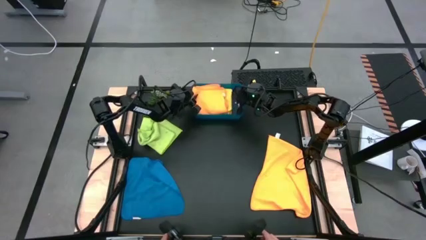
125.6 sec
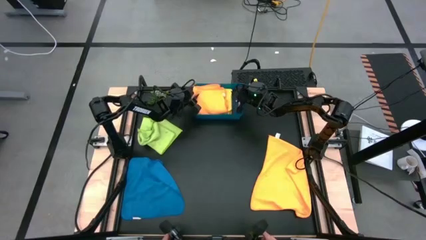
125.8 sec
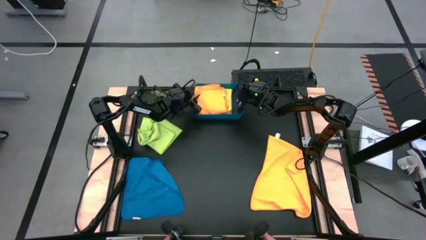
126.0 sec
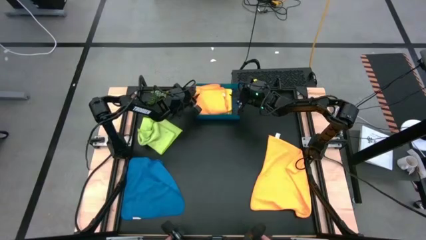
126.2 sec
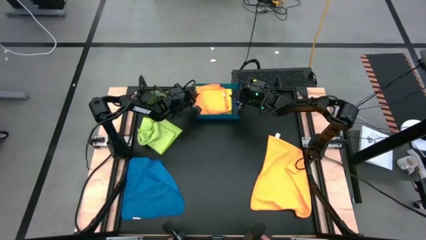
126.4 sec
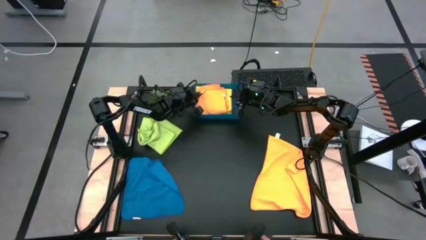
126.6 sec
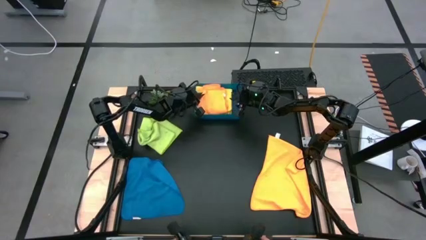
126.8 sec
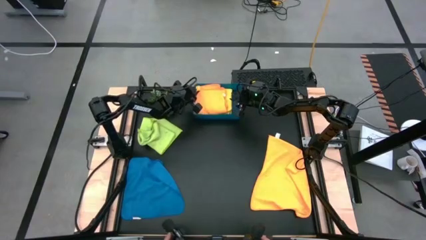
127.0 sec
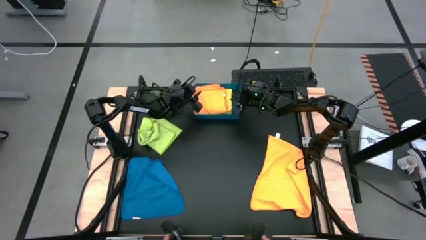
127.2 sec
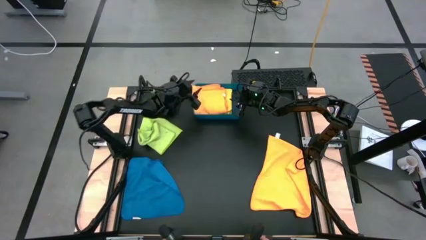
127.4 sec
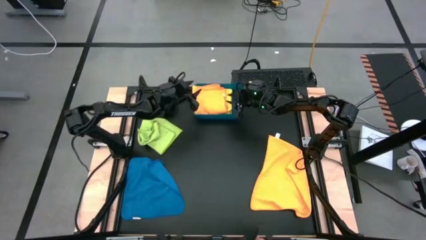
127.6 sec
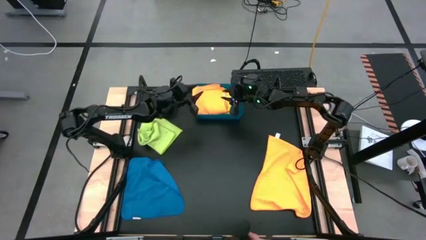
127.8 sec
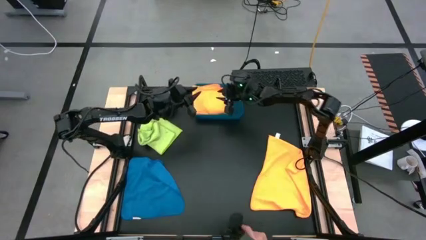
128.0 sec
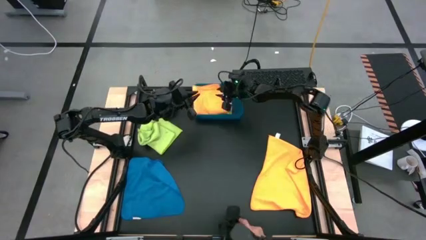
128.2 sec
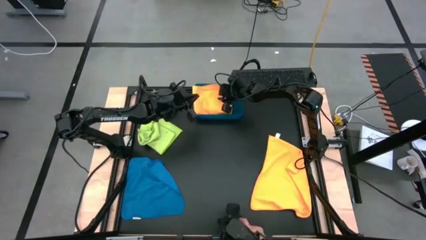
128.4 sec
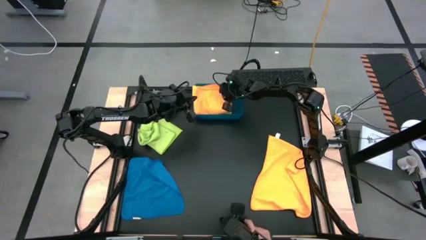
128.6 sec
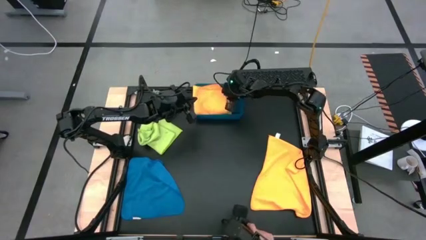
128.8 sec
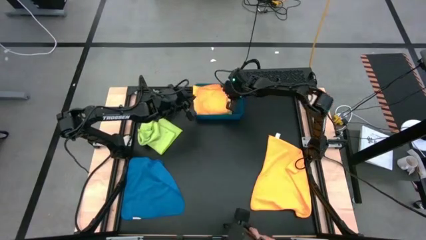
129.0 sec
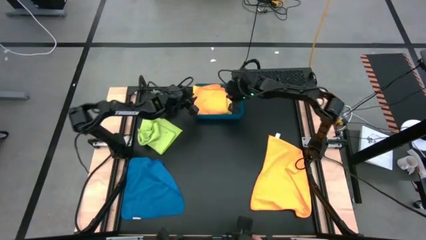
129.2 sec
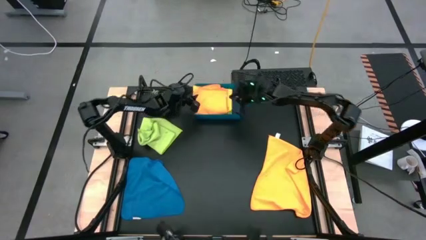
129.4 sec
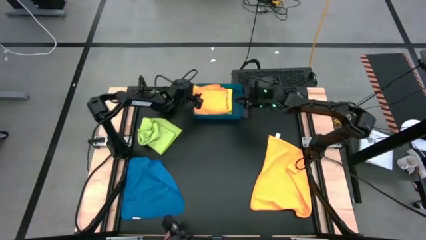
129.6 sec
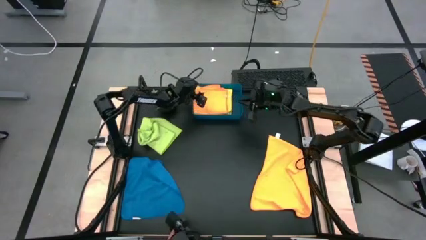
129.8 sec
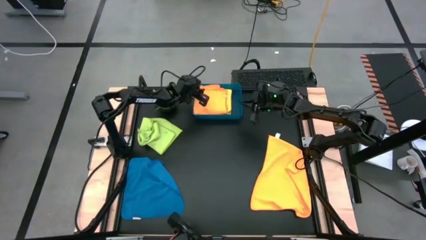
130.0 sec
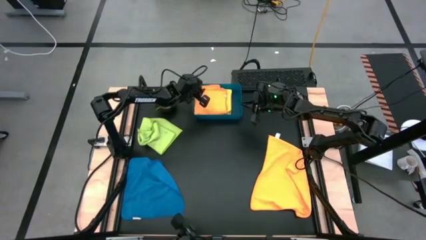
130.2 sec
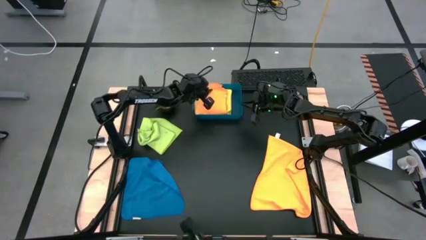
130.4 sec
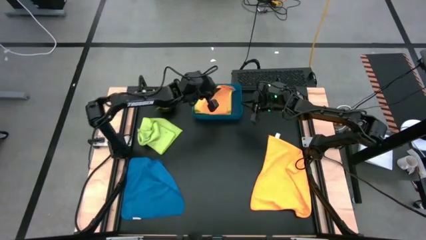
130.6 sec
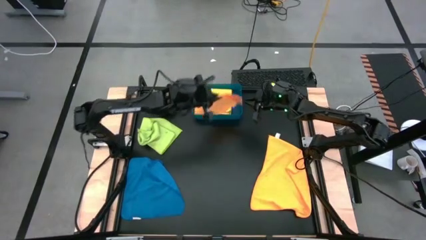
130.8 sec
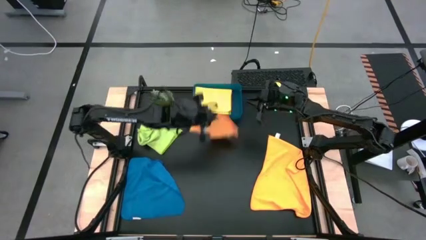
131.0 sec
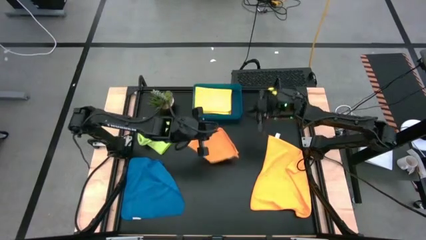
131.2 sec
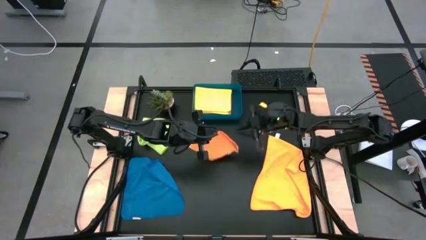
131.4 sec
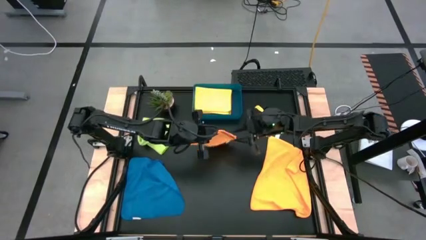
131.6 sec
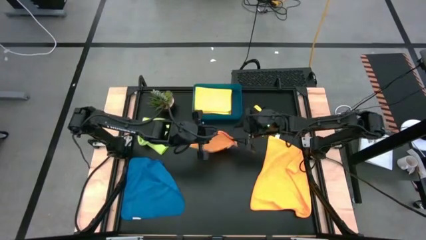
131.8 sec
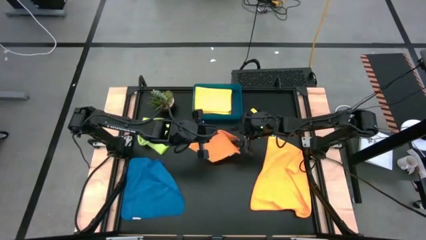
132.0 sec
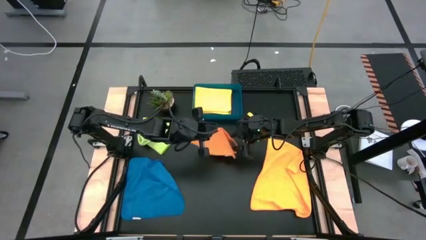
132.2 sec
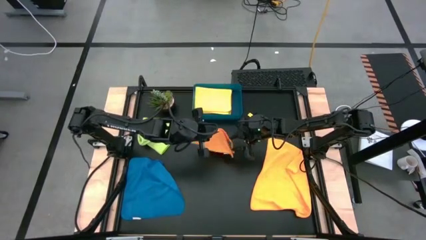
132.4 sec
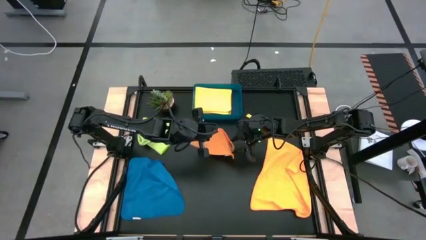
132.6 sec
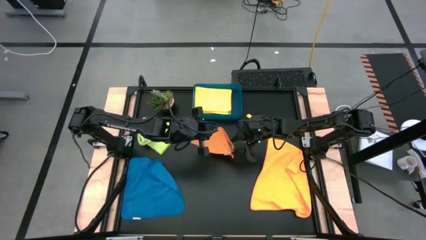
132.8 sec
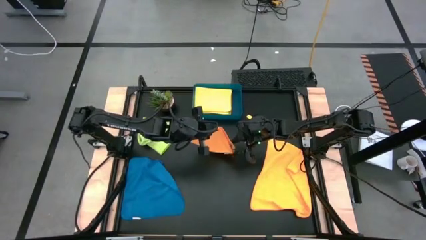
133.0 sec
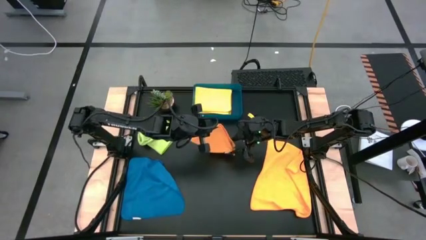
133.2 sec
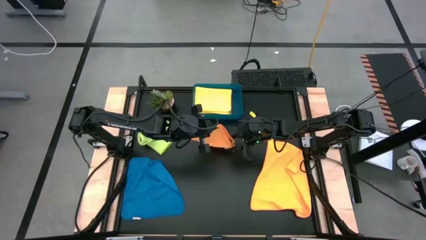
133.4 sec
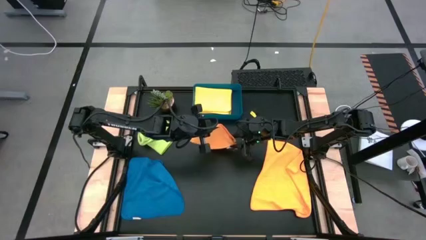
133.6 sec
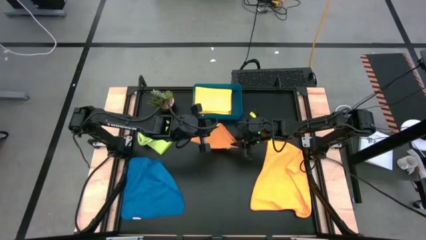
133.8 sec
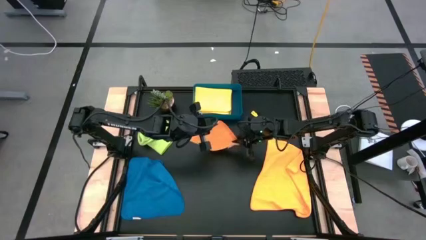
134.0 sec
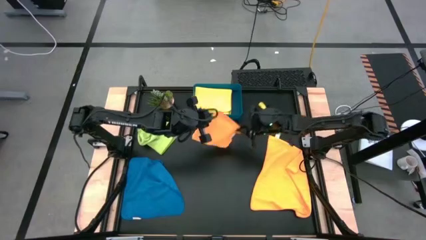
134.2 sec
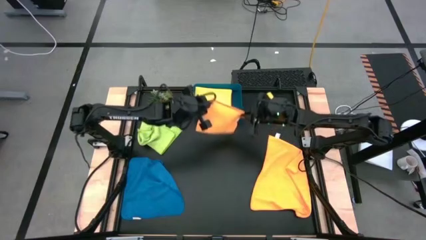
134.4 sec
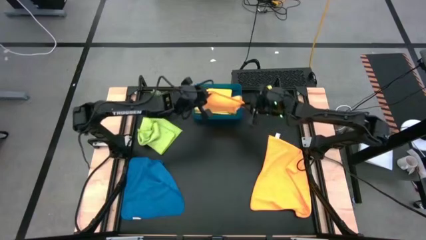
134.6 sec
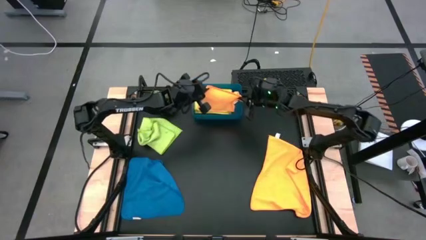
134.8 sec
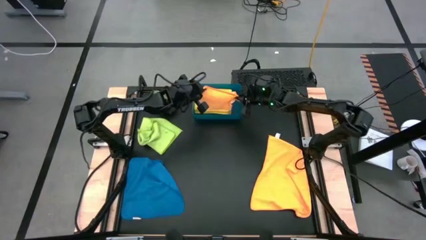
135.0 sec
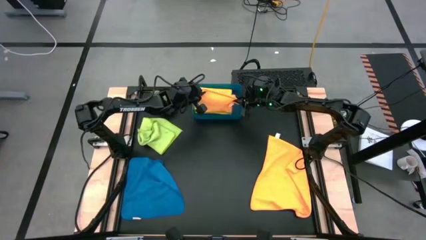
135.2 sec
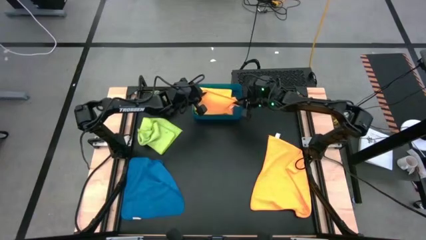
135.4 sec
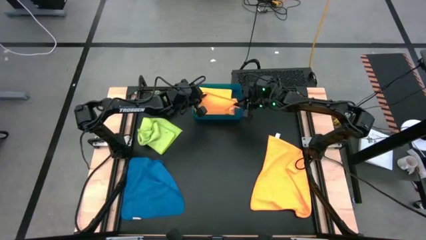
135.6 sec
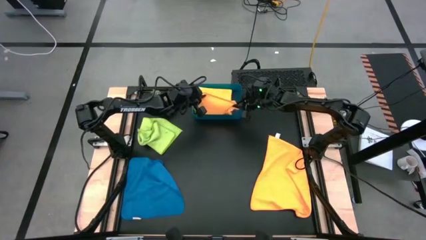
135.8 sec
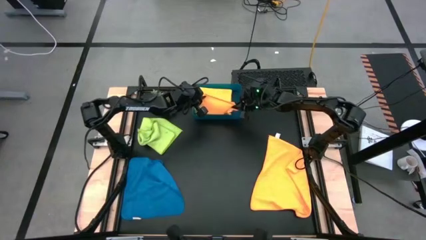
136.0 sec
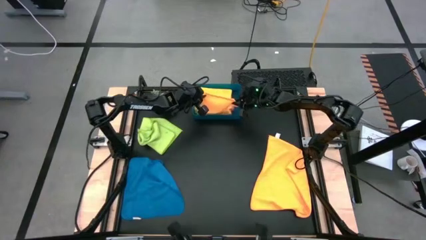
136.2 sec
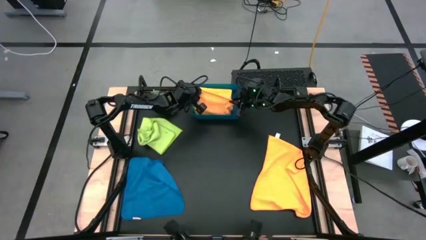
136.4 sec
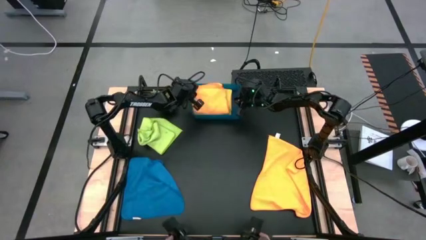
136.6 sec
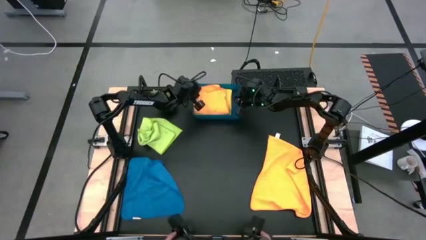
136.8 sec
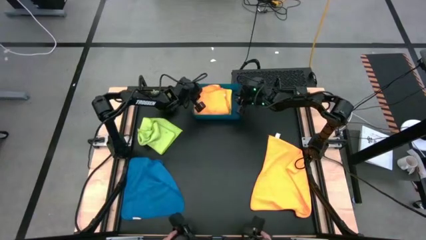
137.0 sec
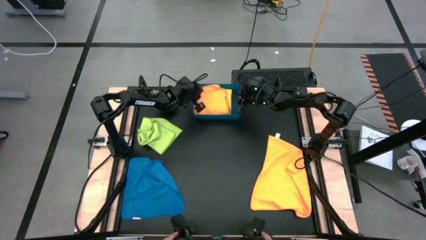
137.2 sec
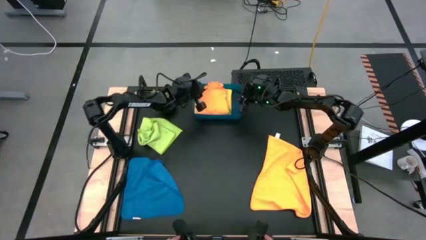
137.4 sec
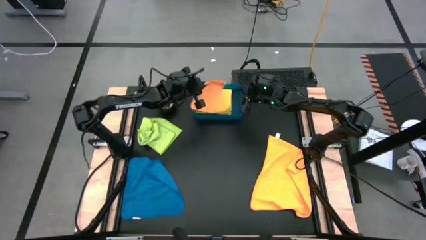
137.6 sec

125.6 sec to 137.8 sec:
Task: Fold microfiber towels
Put the folded orange microfiber cloth into the blue bin

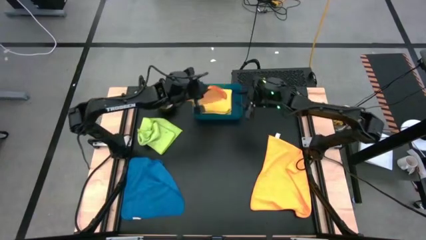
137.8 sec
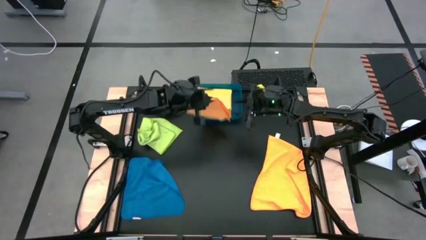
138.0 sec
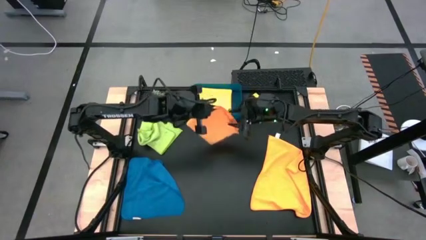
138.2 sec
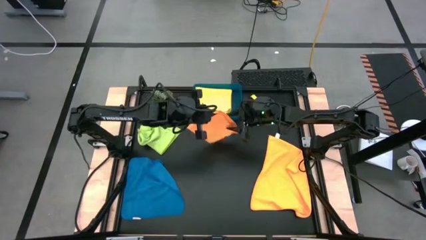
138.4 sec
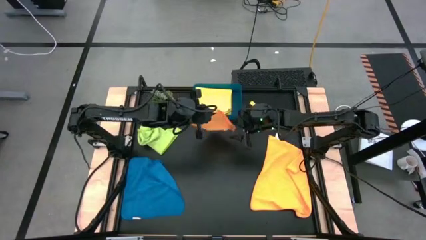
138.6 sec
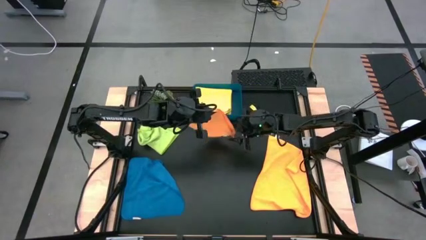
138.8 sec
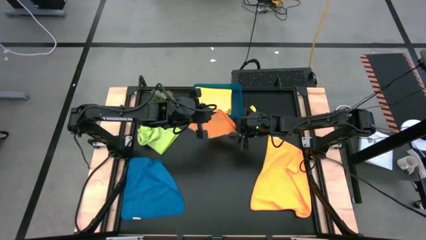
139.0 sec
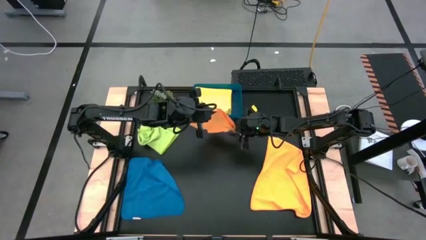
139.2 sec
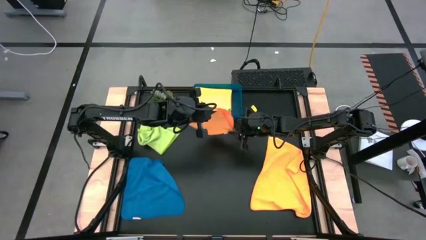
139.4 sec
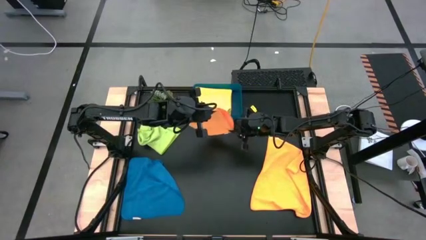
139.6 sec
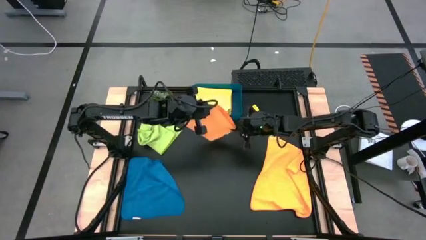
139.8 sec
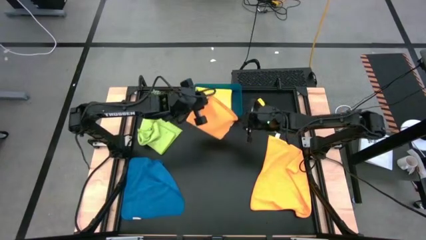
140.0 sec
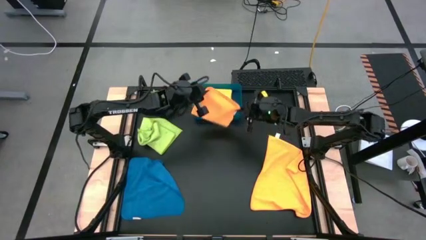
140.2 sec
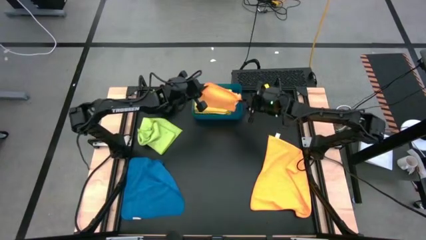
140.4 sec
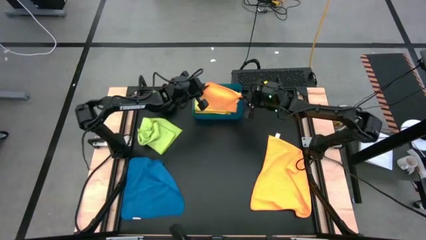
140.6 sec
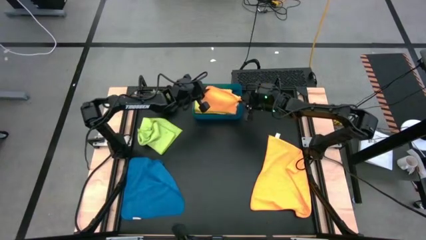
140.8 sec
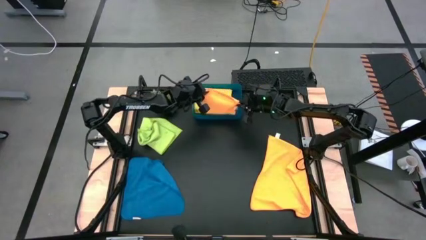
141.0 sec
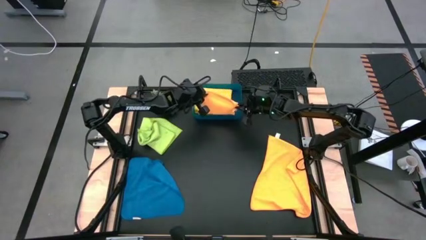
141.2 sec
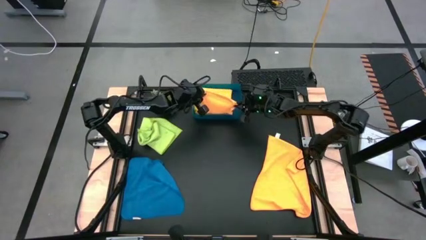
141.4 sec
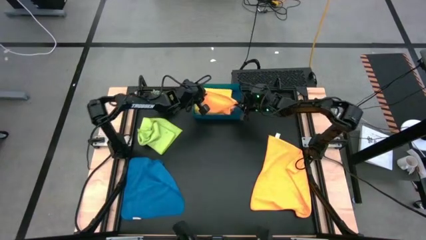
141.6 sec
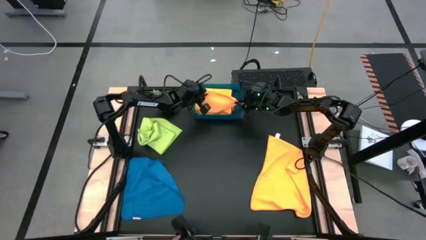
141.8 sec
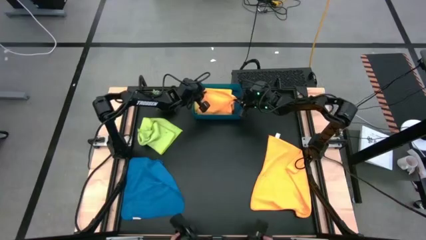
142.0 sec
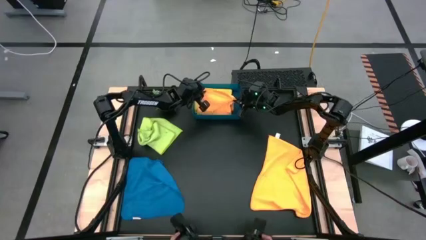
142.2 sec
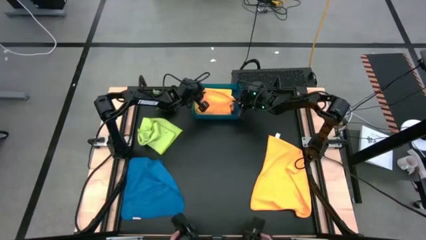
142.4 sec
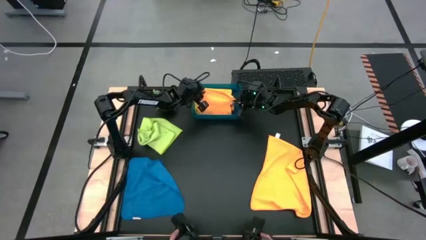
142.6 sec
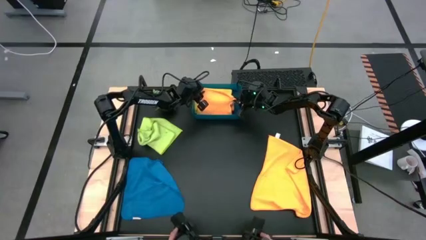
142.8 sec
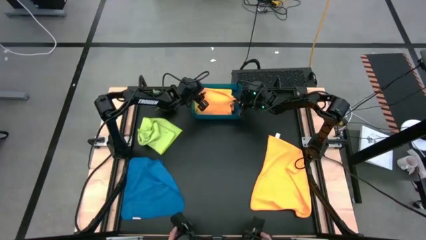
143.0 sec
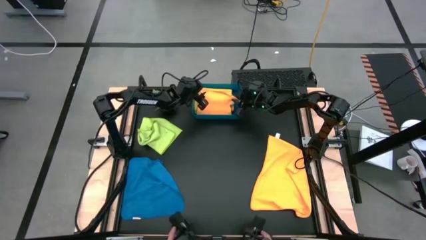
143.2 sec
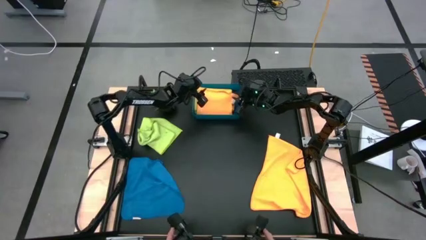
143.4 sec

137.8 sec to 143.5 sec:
Put the folded orange microfiber cloth into the blue bin
